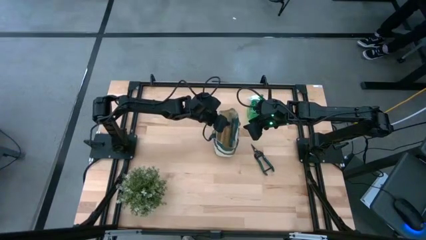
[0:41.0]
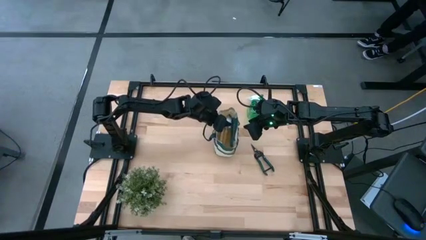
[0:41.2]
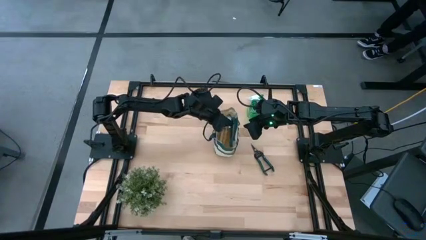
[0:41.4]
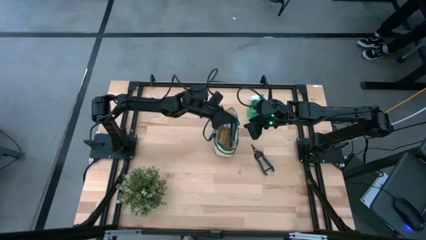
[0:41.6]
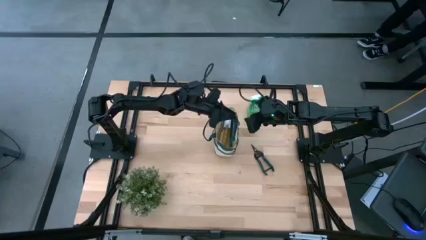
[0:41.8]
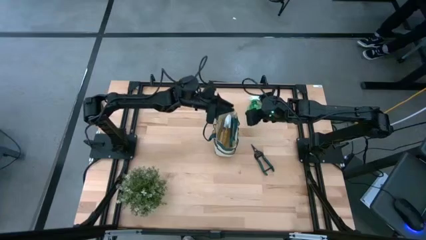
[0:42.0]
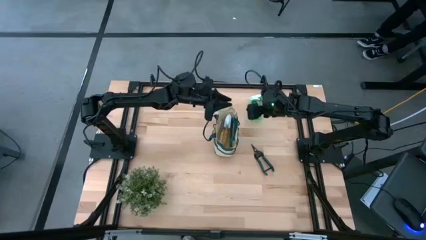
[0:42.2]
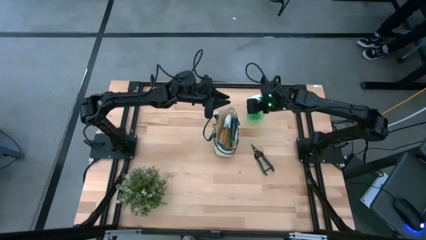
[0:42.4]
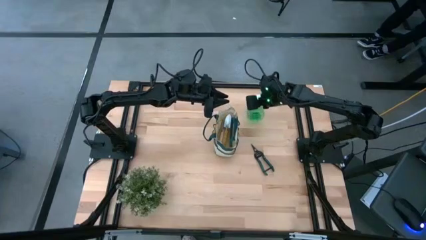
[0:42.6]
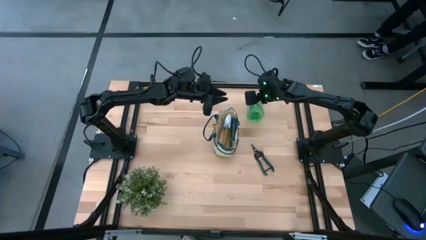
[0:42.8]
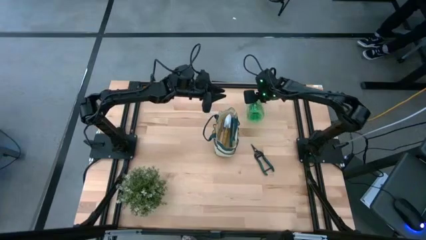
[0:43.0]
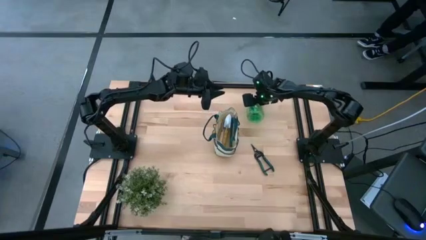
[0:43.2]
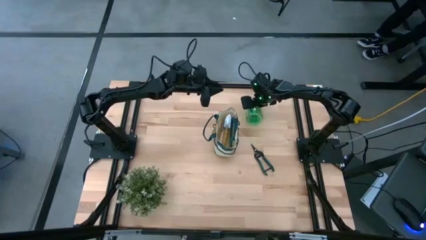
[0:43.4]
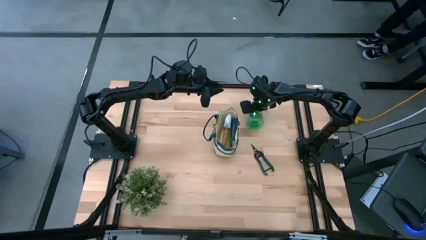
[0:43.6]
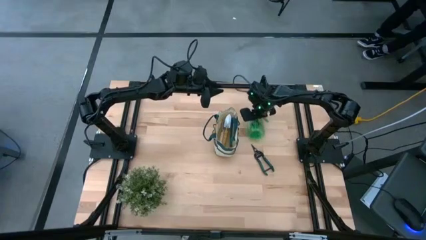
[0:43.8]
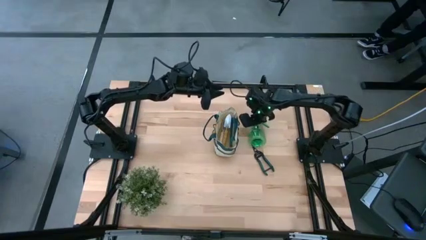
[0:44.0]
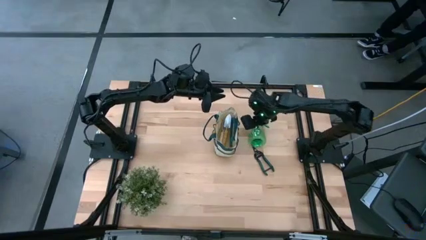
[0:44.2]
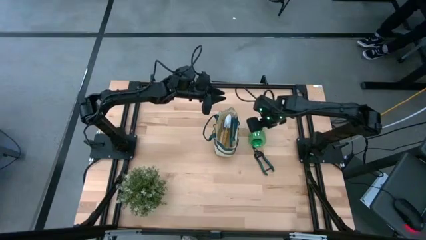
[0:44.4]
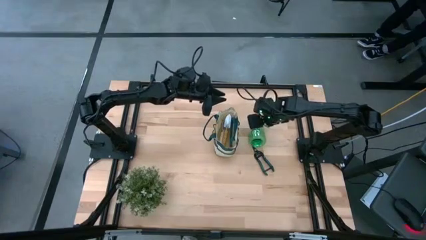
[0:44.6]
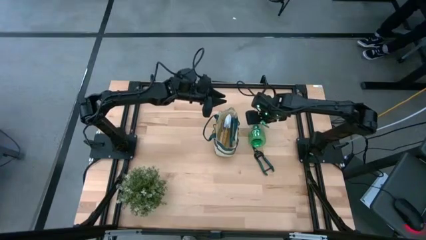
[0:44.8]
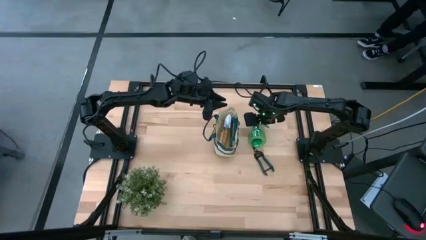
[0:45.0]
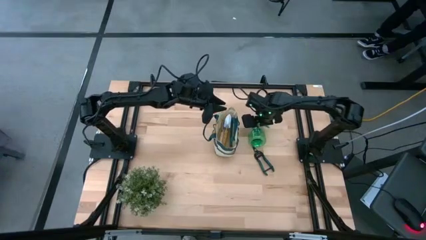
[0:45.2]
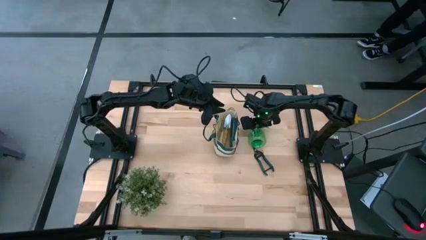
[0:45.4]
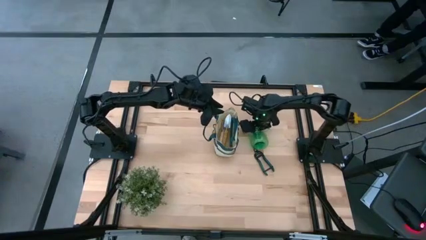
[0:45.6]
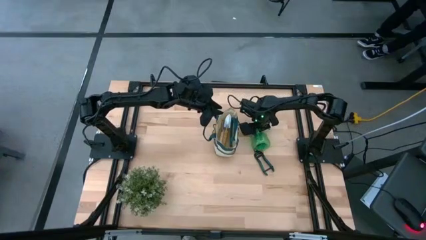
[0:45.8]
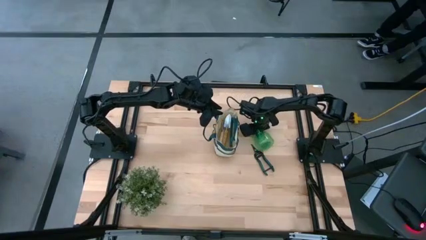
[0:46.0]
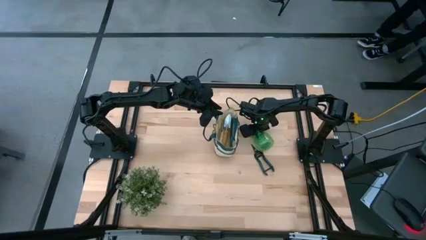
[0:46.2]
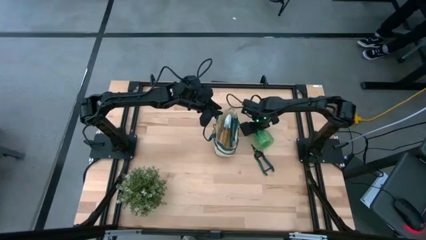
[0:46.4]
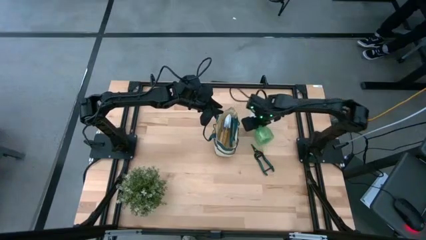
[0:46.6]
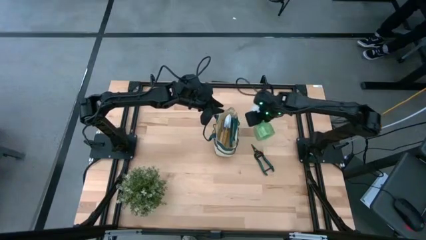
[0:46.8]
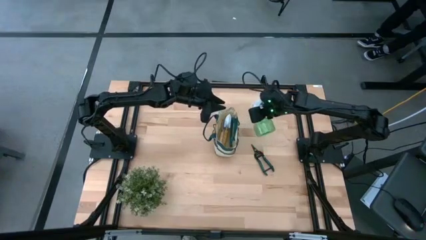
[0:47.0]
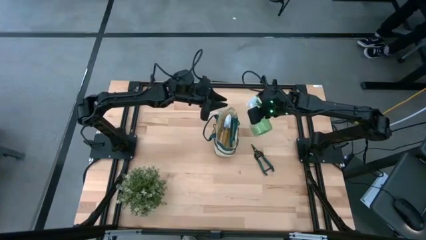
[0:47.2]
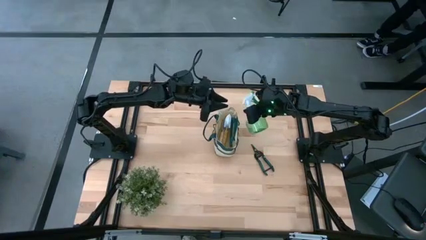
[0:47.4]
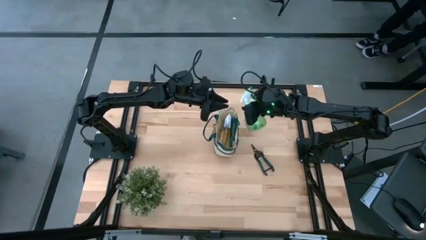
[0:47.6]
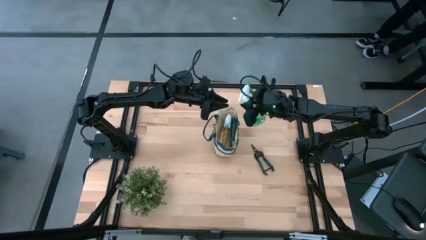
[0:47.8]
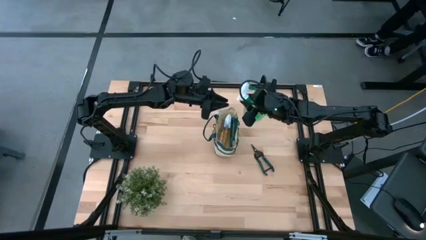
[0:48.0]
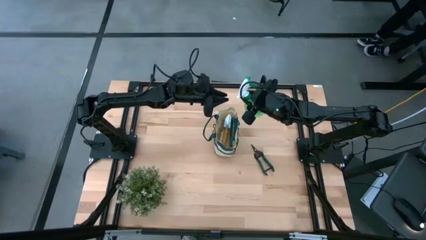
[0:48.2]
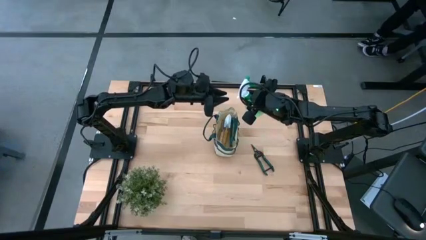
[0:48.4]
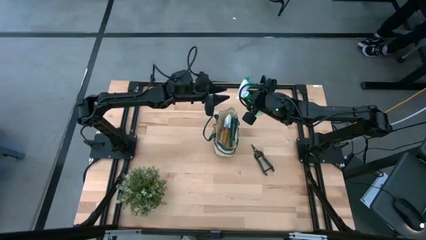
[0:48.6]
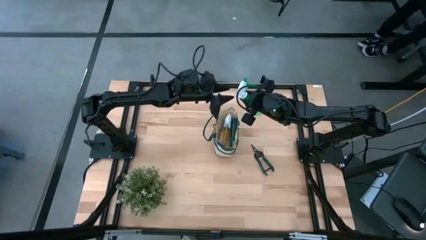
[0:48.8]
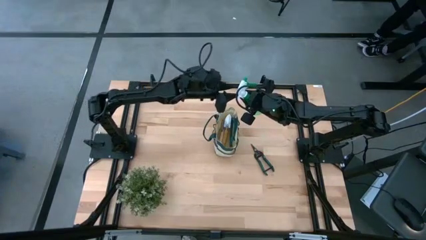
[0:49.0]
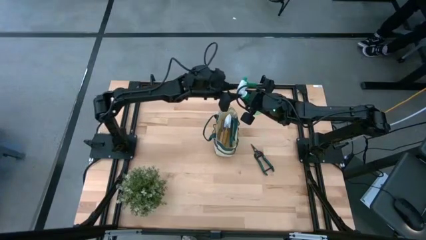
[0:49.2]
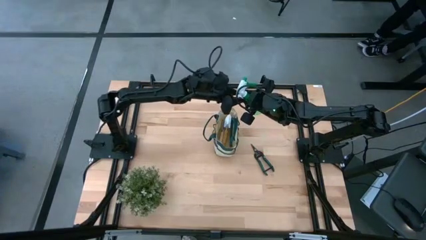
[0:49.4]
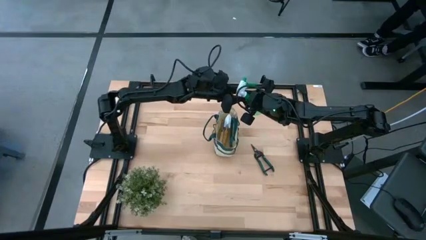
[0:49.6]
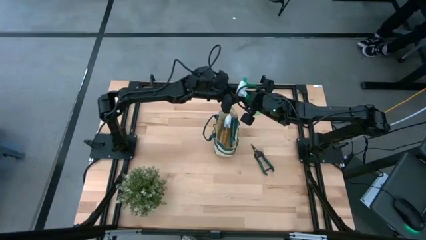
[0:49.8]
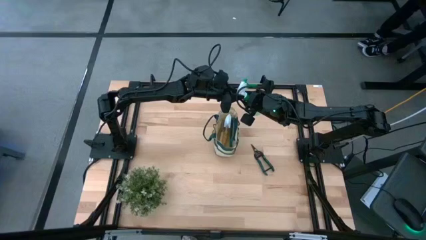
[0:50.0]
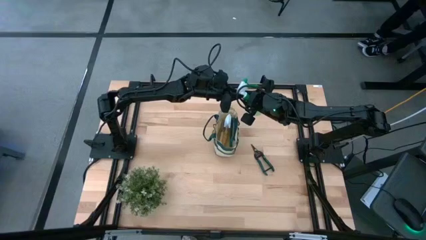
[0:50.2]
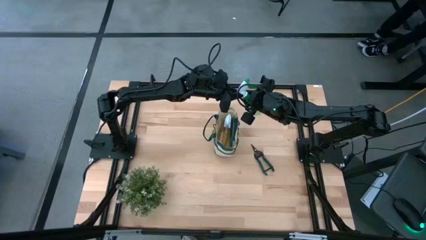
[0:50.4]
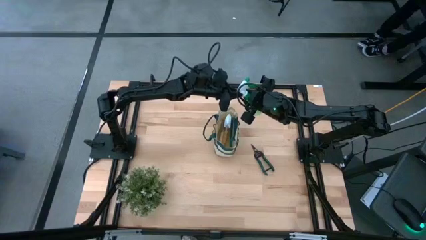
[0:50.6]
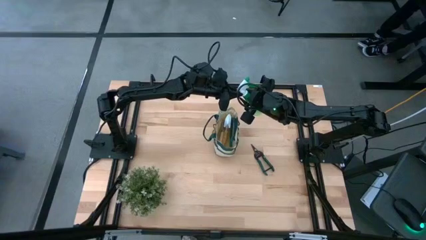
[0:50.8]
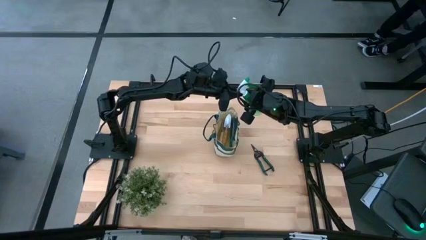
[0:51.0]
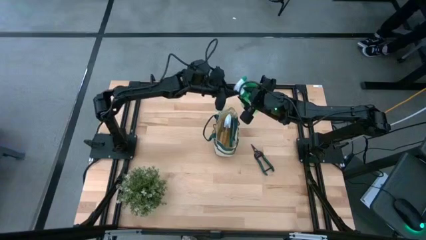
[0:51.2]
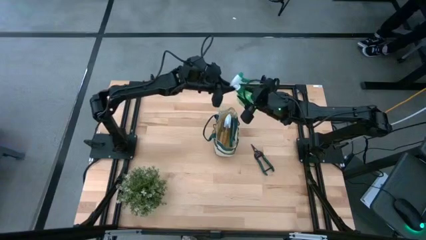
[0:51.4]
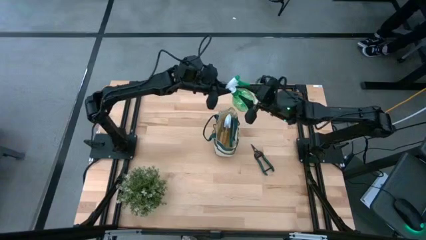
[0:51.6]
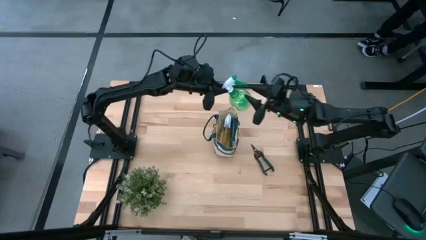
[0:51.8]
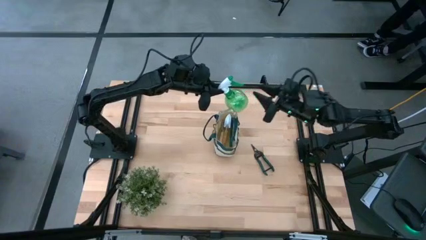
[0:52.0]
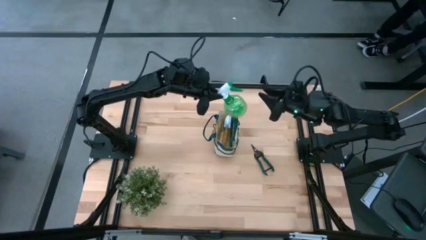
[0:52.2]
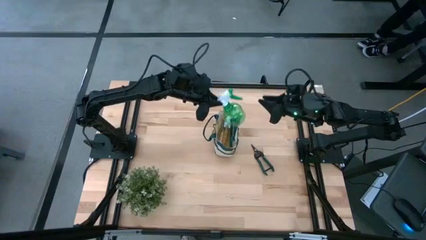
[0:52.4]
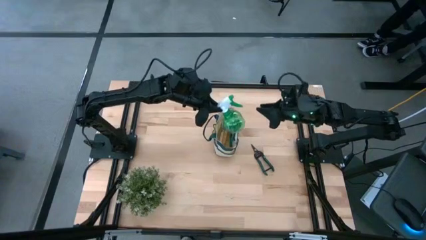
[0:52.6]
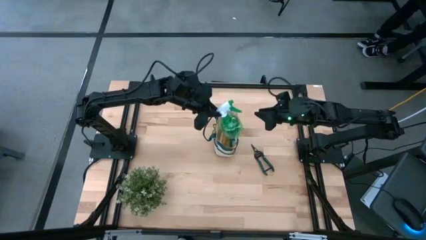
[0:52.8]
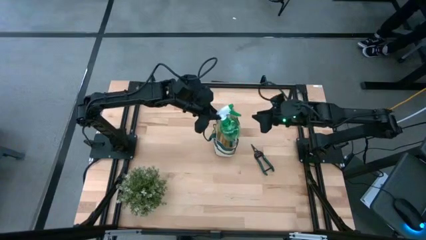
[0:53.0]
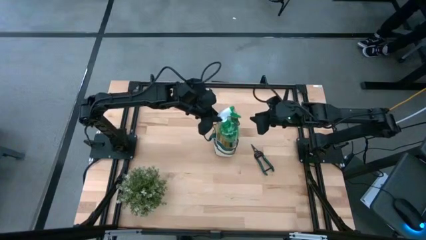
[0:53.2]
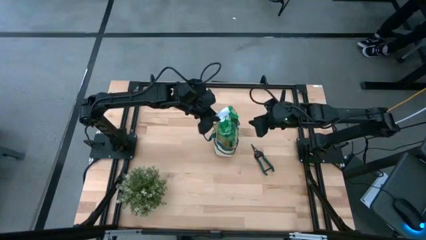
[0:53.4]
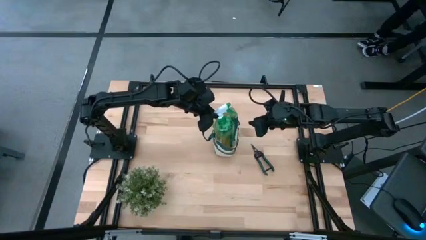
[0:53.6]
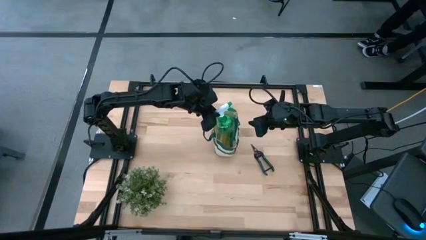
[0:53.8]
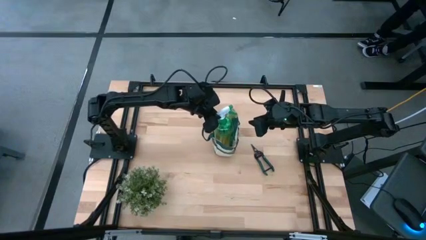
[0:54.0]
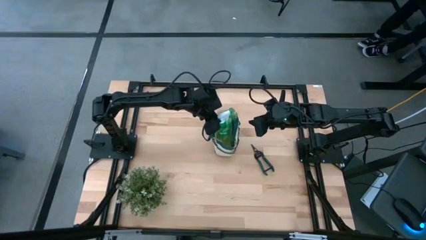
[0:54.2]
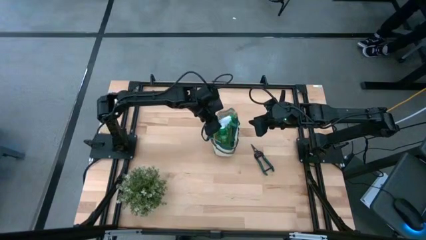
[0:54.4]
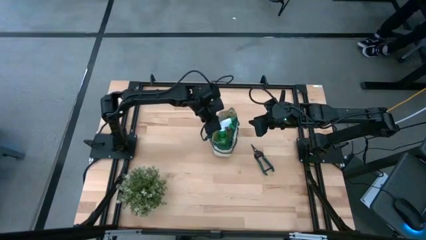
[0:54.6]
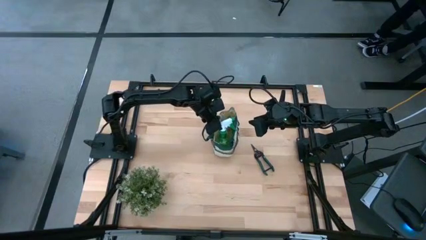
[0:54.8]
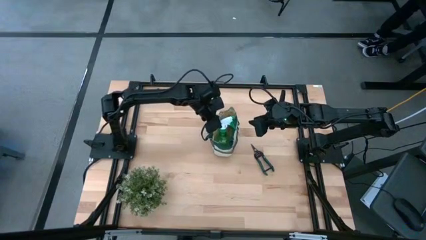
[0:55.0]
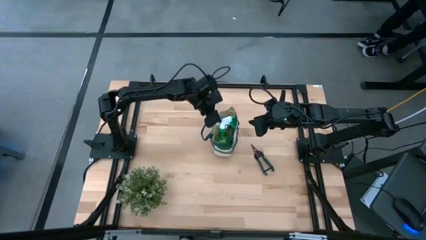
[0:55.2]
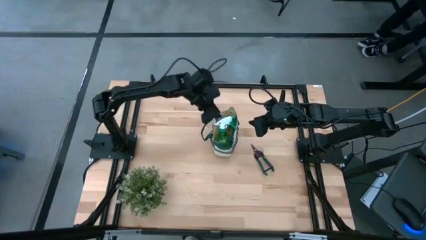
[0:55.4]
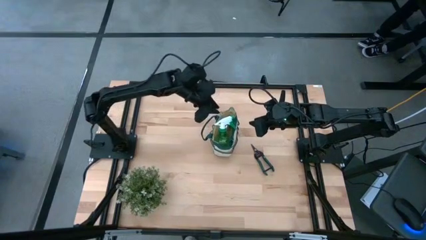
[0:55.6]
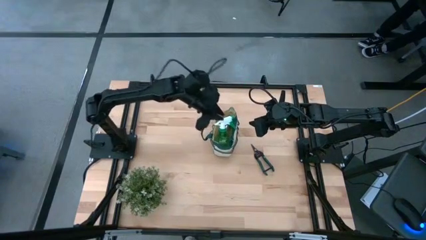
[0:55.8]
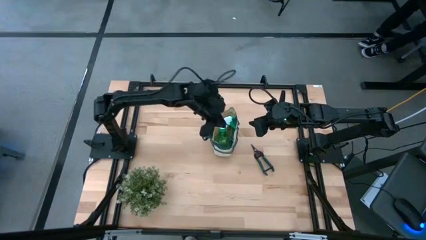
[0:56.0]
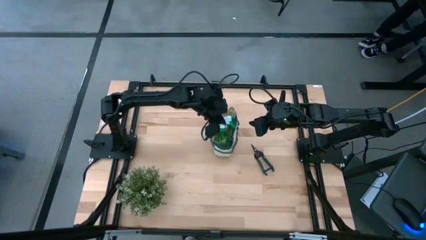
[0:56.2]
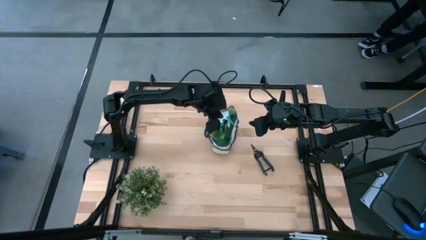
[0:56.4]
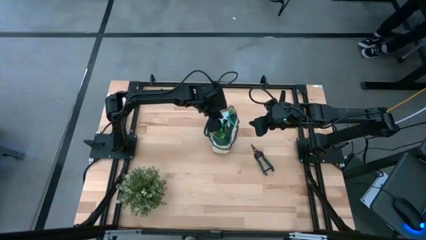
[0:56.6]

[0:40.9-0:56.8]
Task: Pick & Place Garden tools in Gardening bag
Put the spray bottle into the gardening bag
